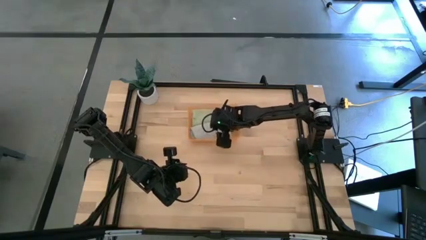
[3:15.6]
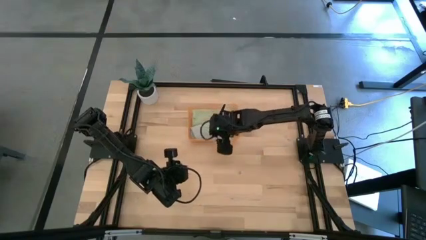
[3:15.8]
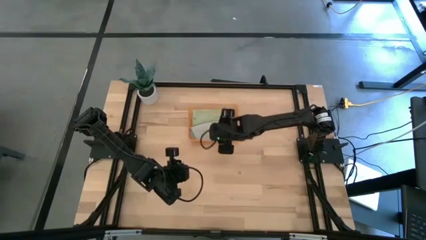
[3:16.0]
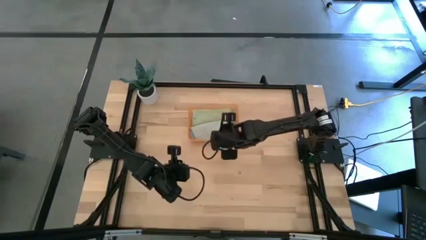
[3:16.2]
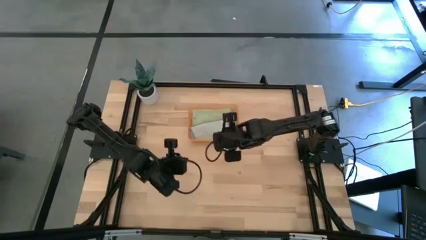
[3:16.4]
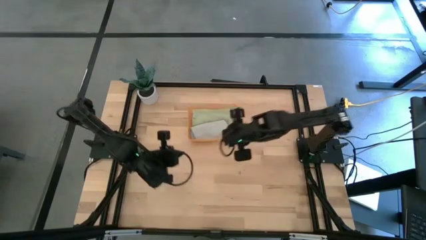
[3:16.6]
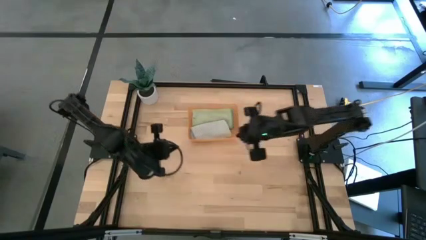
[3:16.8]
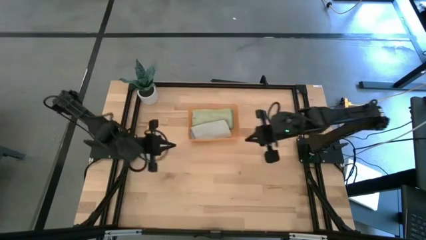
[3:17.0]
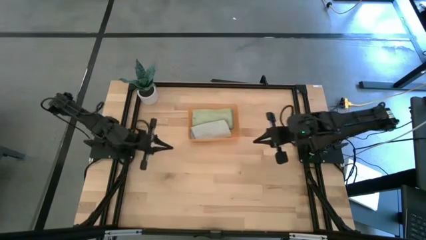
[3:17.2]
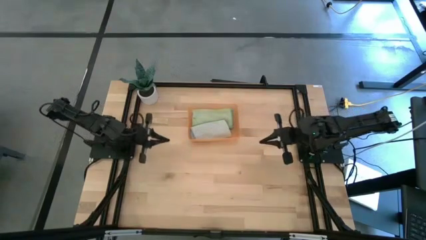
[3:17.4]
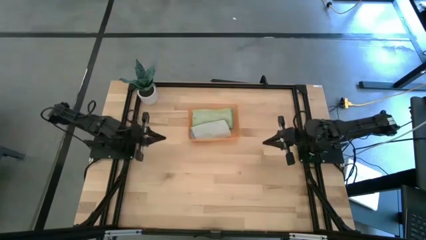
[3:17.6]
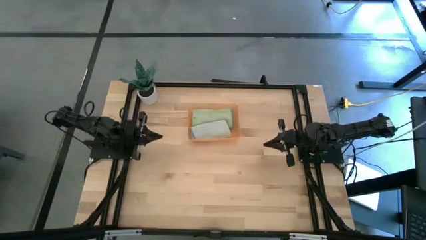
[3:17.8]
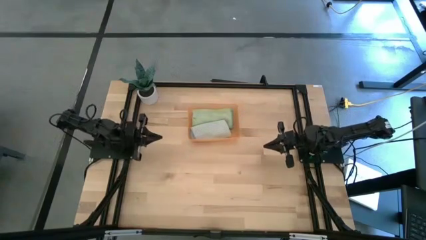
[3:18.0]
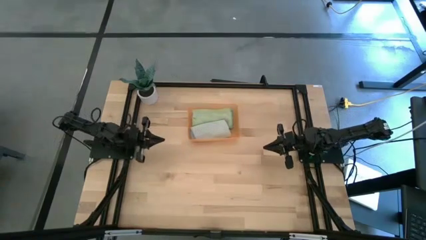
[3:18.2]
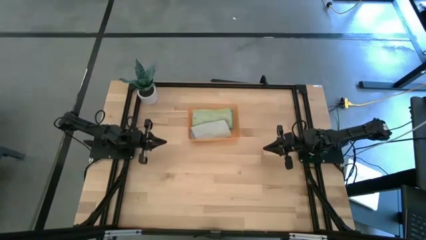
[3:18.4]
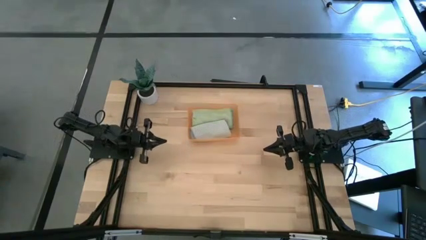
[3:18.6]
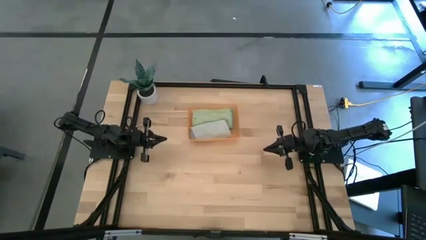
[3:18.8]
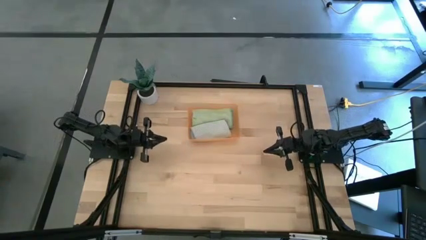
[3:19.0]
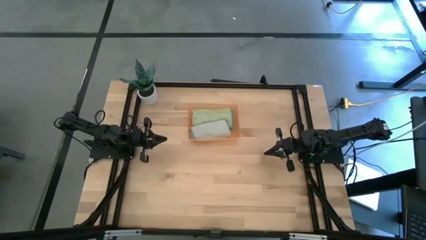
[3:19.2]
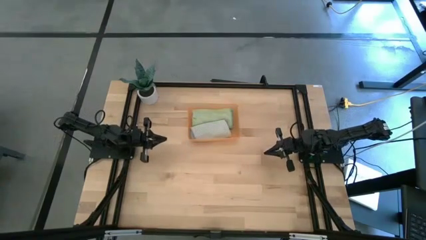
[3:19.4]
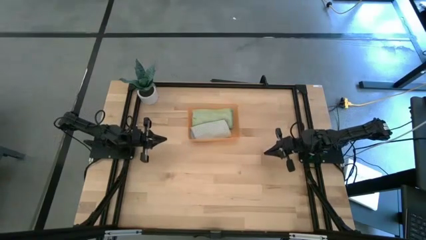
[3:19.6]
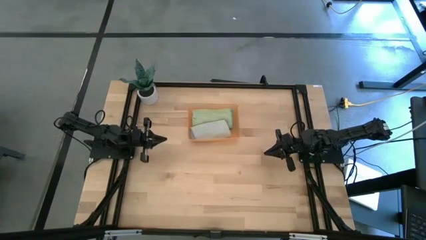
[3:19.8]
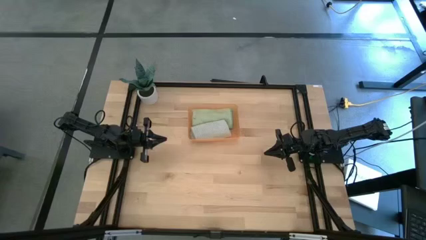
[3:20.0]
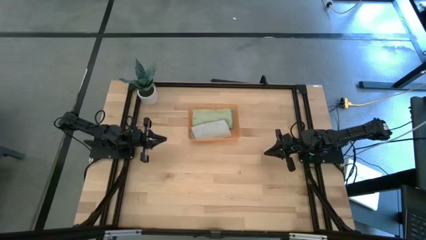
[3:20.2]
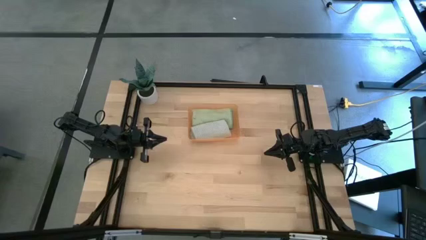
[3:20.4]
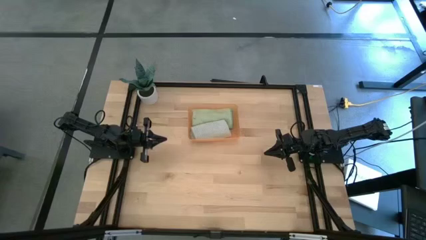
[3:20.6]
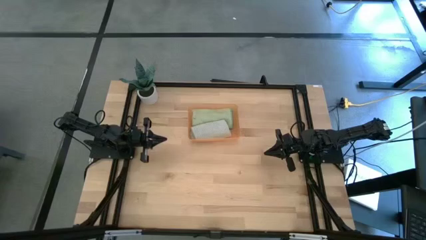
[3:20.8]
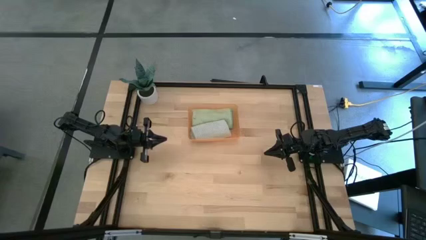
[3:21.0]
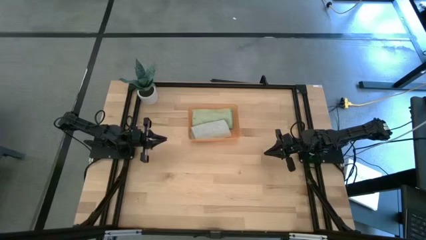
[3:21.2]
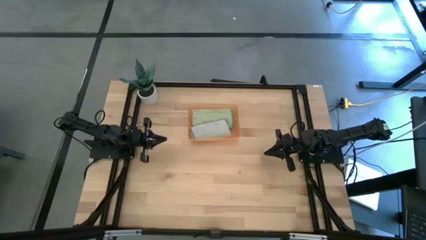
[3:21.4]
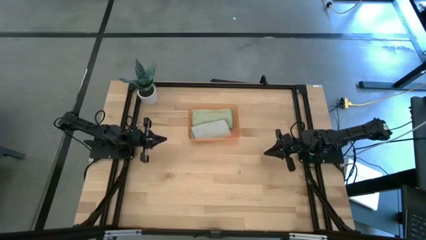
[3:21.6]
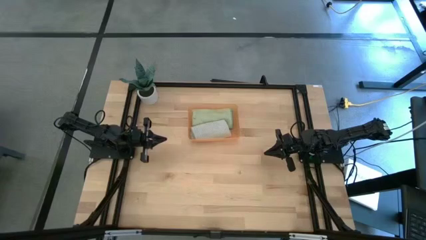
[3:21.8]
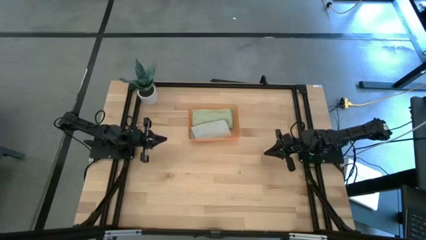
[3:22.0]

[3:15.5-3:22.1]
Task: Roll microfiber towels into tight, uniform cylinder then place into a basket
Return to Home Position

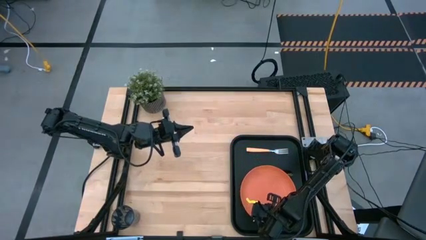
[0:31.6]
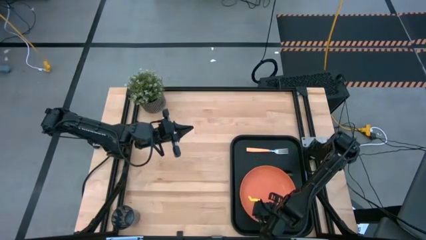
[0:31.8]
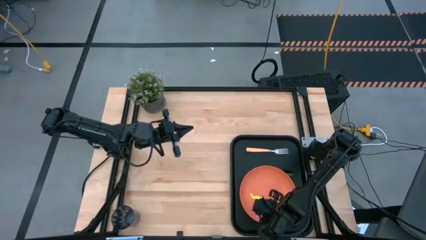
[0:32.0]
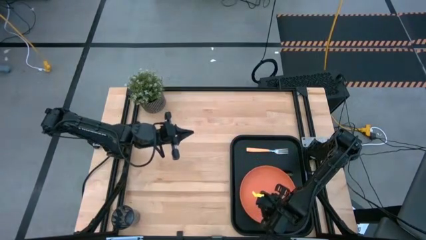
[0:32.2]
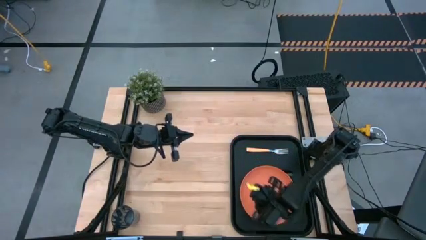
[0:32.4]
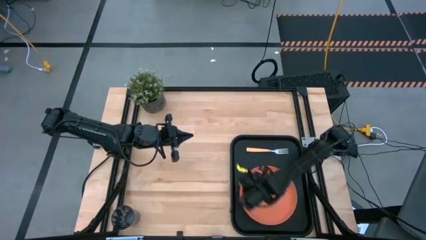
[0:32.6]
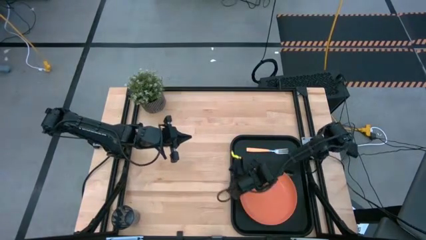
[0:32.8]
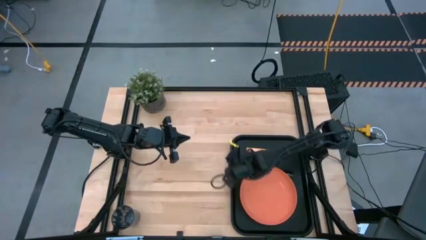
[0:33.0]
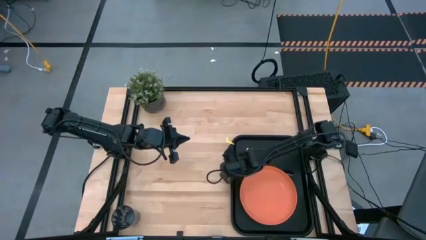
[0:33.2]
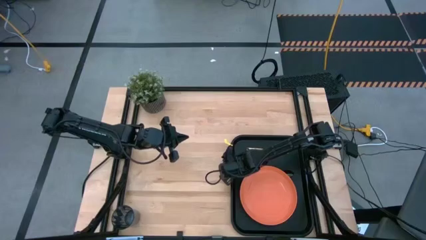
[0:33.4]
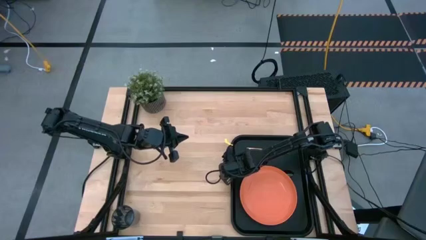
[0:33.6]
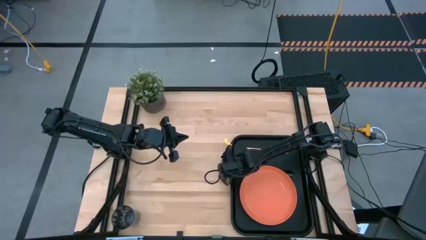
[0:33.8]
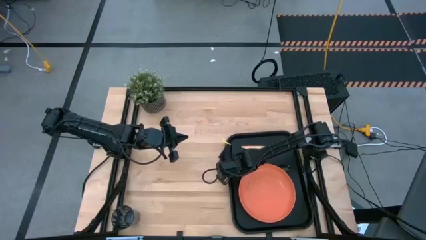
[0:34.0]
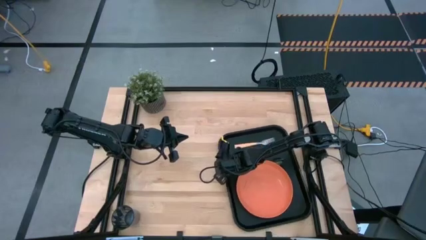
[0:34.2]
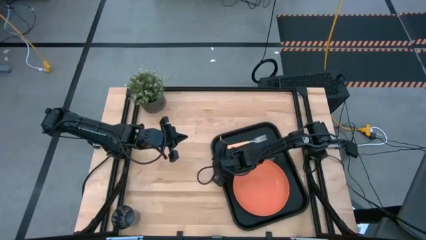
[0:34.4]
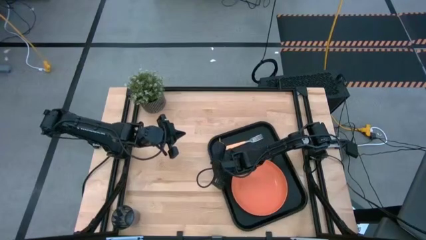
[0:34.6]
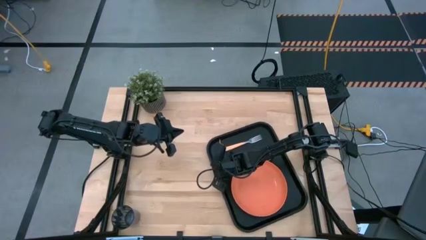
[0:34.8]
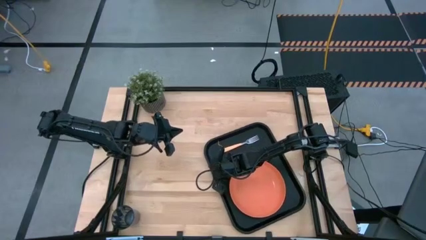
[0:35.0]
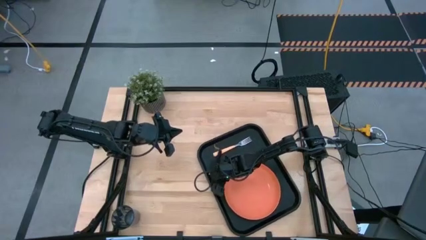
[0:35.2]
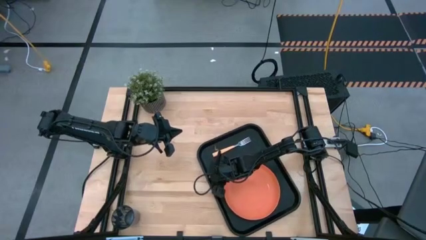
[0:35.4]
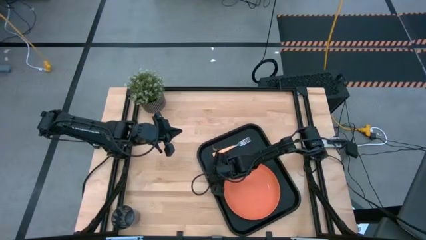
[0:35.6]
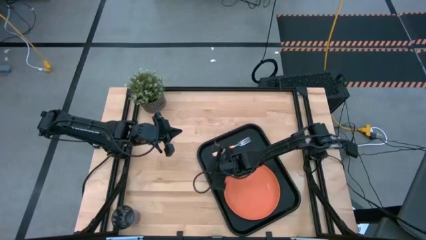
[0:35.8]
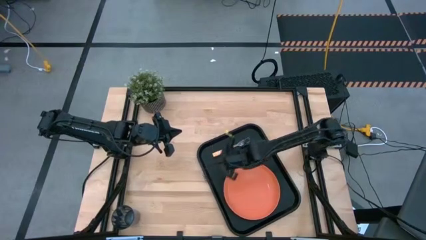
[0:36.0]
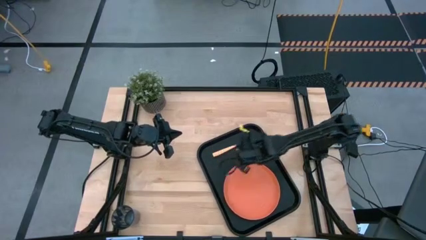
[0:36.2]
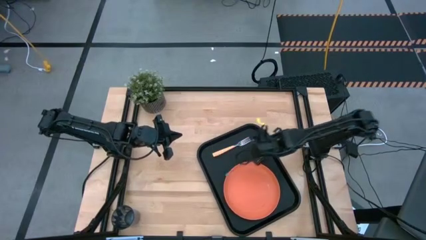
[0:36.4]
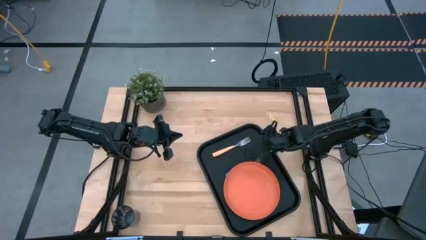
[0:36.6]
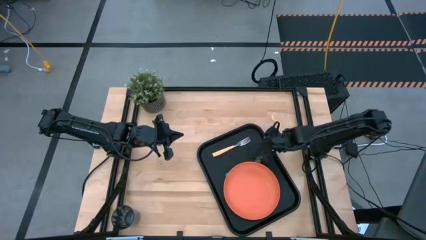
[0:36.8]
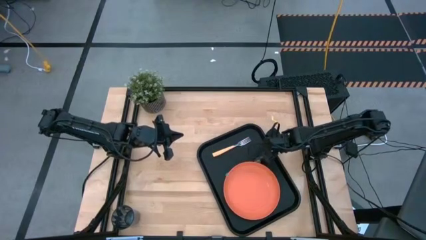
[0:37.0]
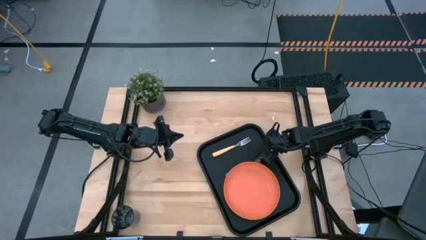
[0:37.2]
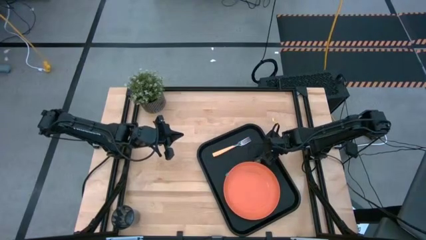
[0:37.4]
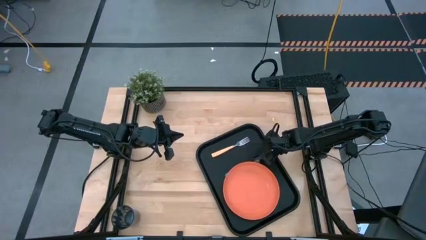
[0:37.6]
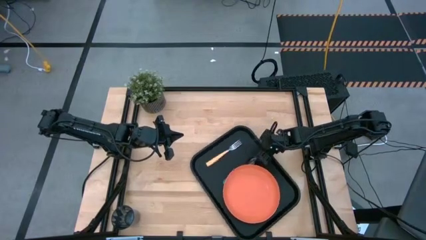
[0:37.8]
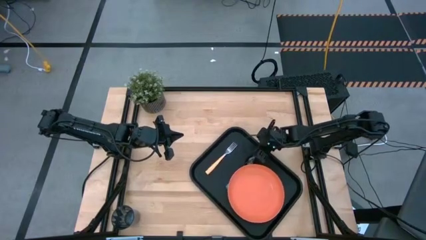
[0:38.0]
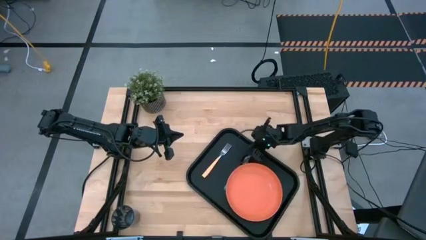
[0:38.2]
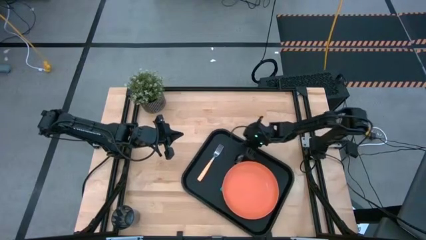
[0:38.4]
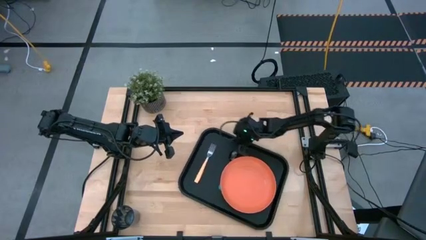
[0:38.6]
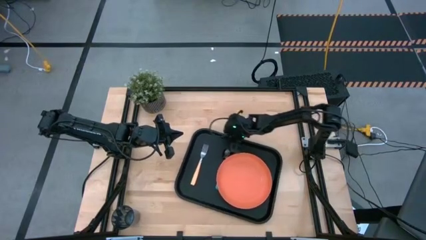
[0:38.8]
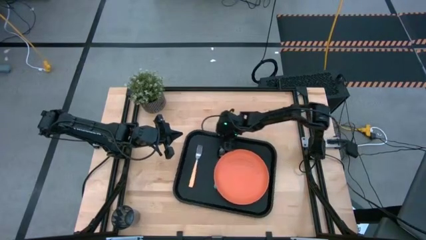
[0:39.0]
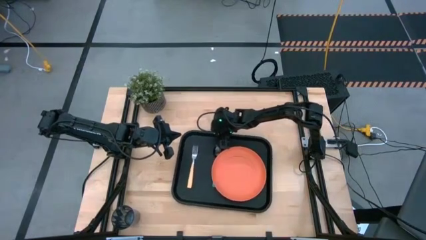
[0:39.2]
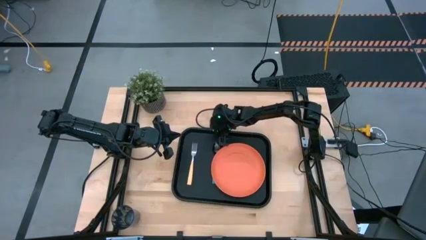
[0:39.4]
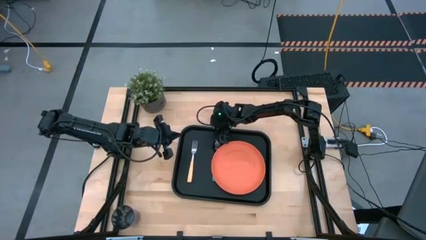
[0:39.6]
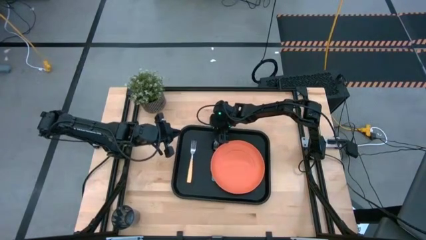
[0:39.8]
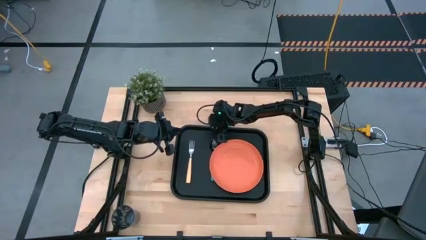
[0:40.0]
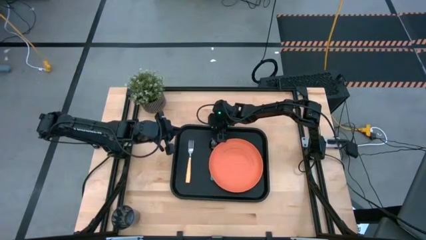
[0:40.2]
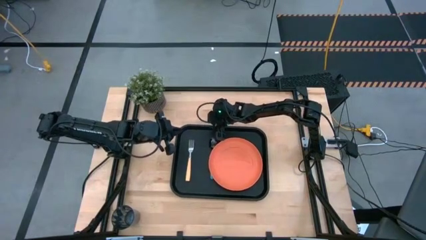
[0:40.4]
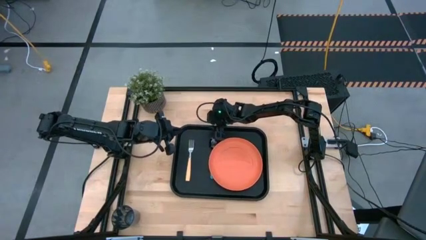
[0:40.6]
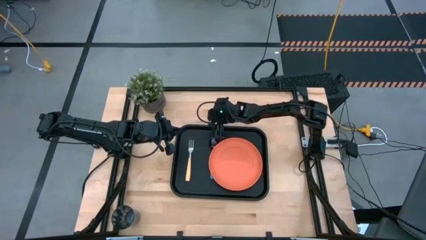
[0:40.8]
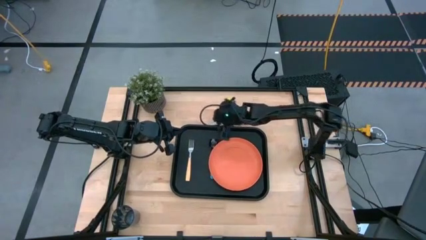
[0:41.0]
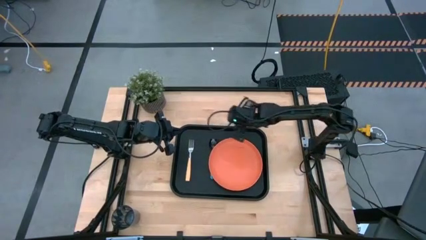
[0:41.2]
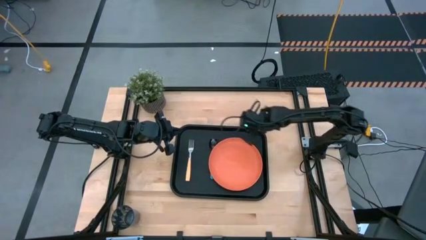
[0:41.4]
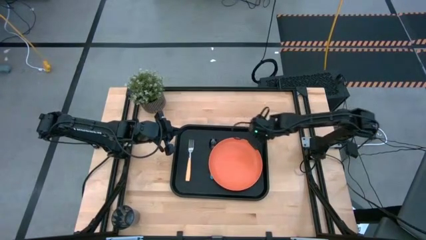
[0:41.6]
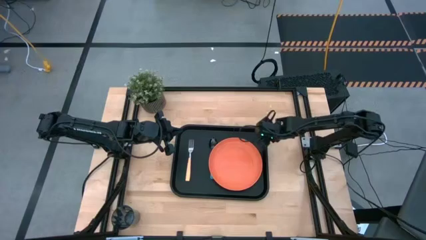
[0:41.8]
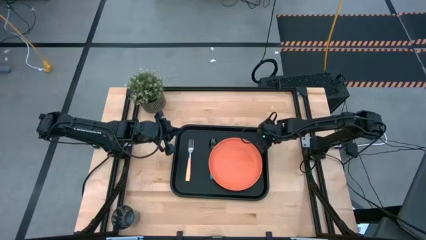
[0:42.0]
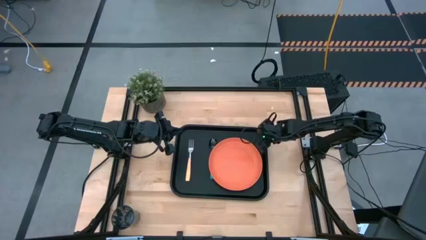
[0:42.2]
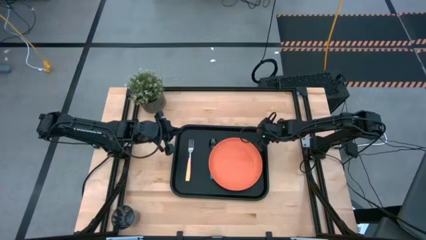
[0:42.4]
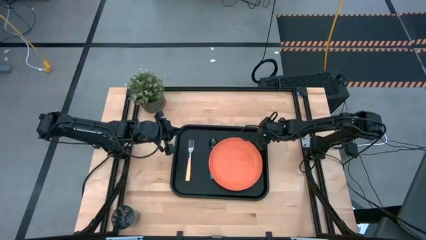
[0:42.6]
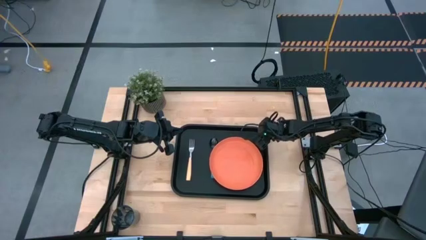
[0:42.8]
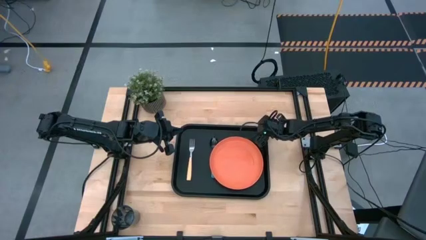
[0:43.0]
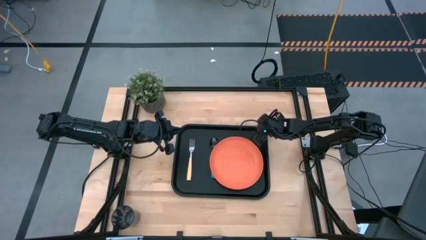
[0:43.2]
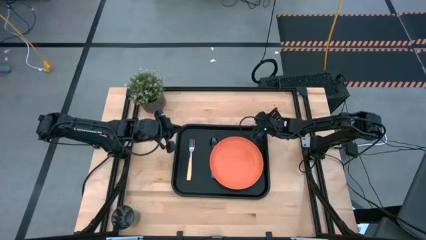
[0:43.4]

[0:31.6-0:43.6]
Task: Pick and place plate/cup/fork/spoon on tray
Move the black table tray from right to center table
